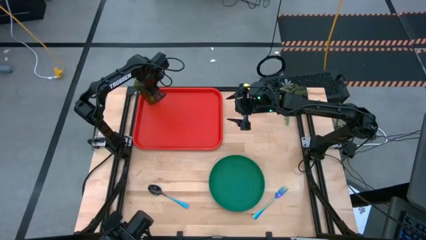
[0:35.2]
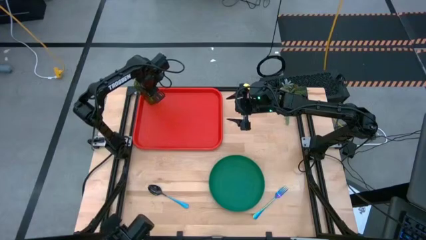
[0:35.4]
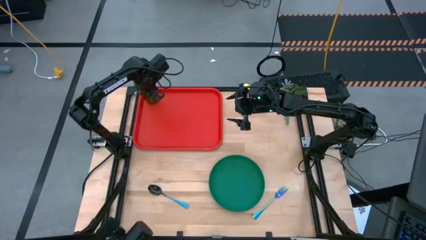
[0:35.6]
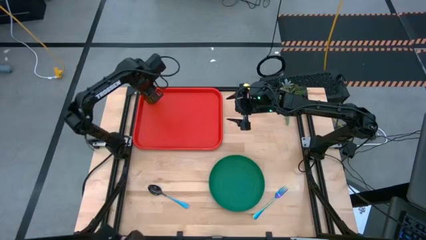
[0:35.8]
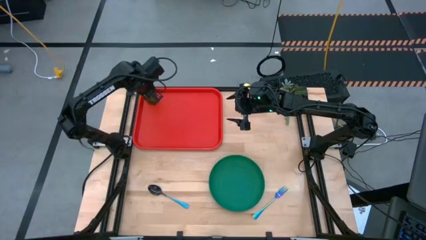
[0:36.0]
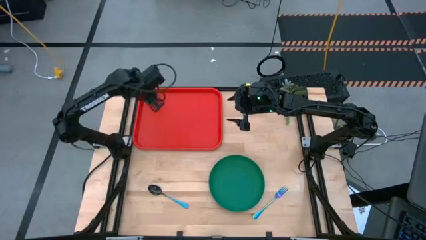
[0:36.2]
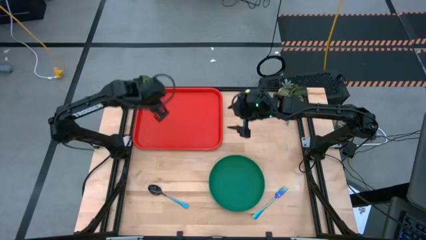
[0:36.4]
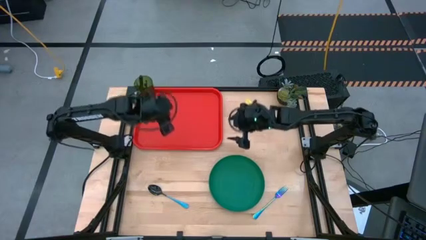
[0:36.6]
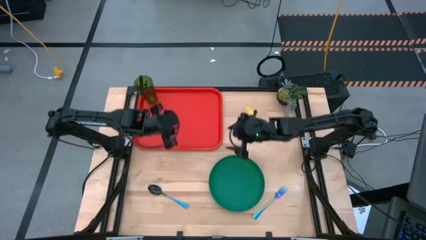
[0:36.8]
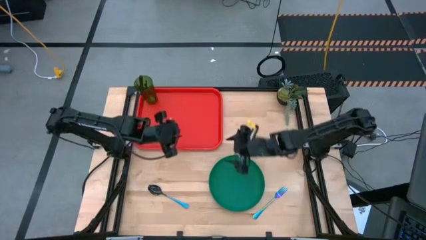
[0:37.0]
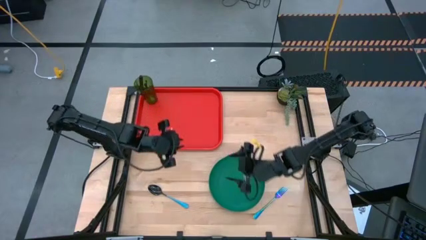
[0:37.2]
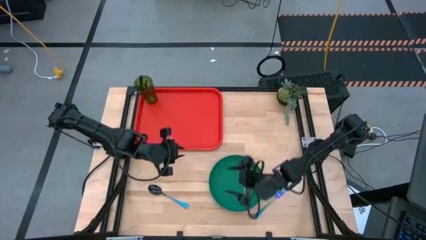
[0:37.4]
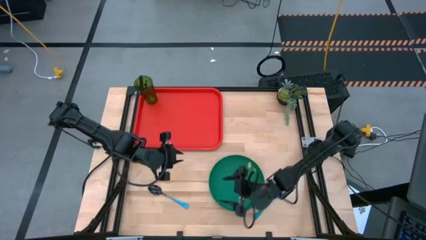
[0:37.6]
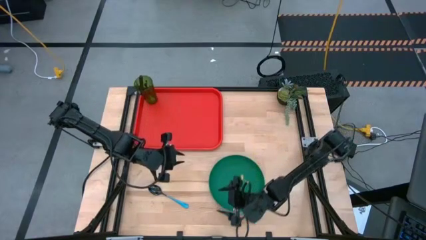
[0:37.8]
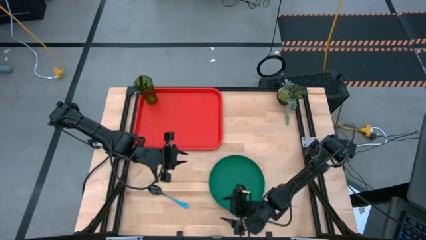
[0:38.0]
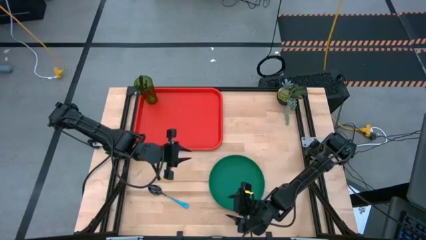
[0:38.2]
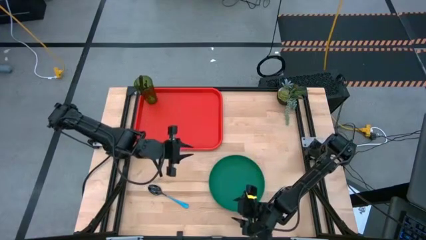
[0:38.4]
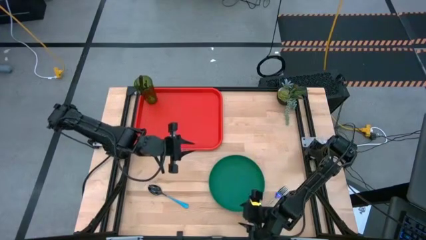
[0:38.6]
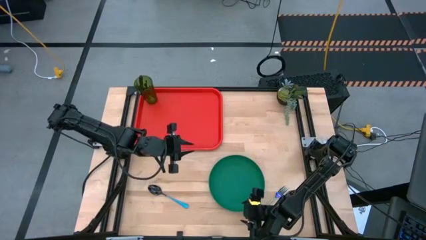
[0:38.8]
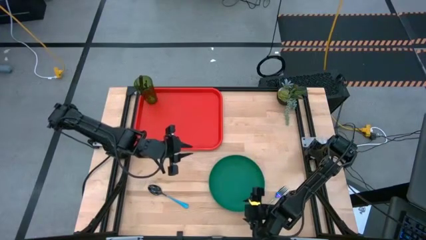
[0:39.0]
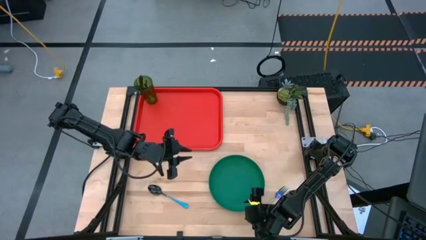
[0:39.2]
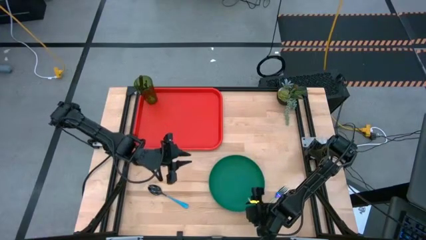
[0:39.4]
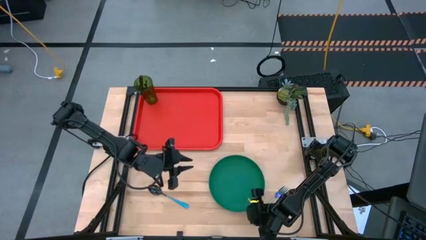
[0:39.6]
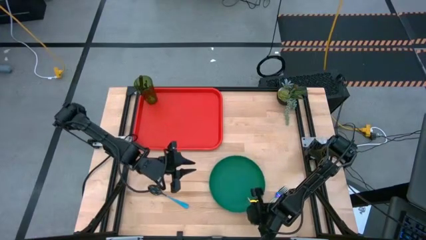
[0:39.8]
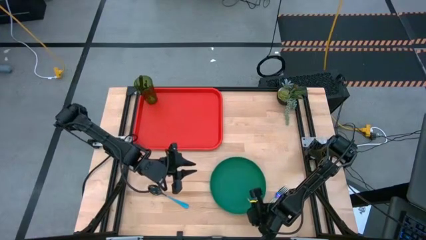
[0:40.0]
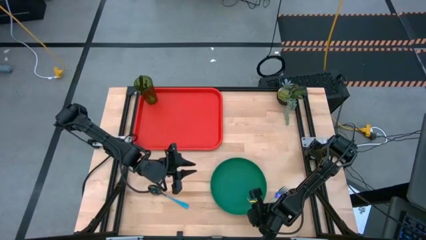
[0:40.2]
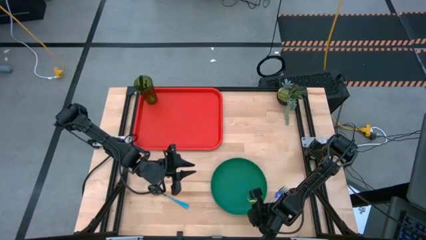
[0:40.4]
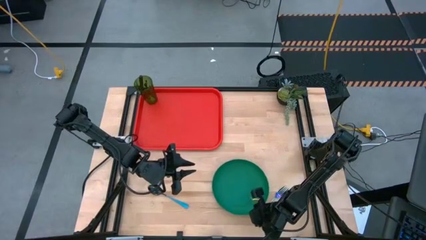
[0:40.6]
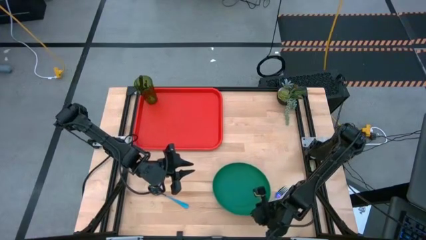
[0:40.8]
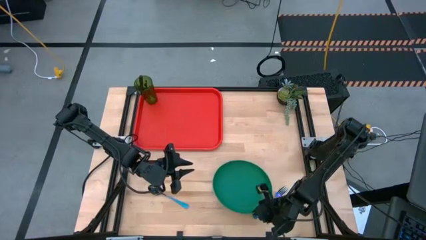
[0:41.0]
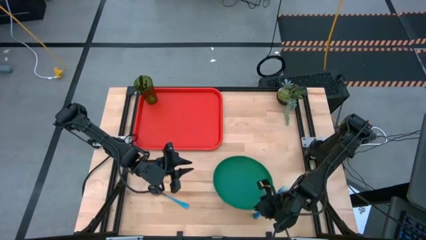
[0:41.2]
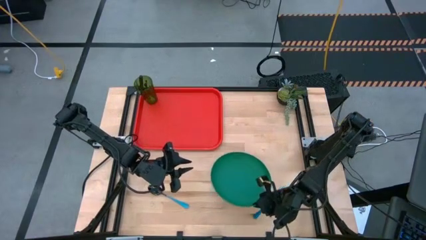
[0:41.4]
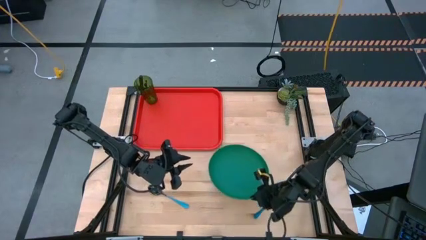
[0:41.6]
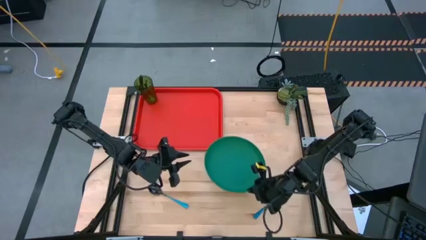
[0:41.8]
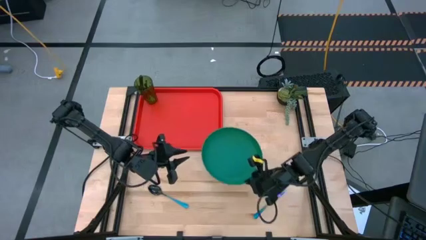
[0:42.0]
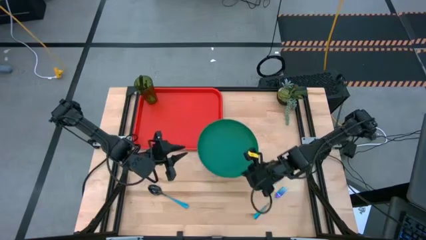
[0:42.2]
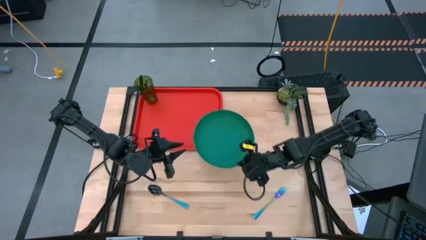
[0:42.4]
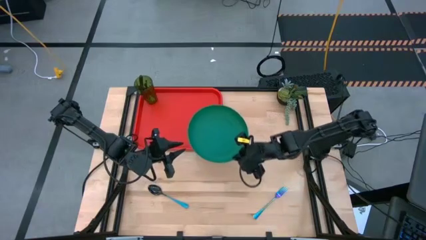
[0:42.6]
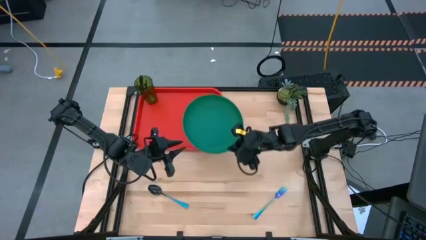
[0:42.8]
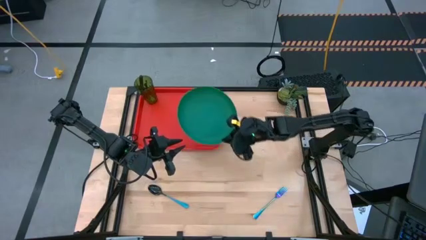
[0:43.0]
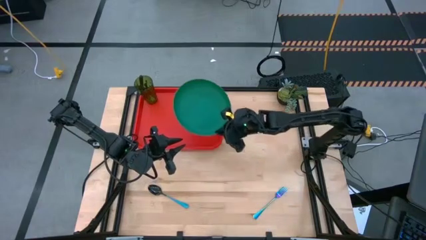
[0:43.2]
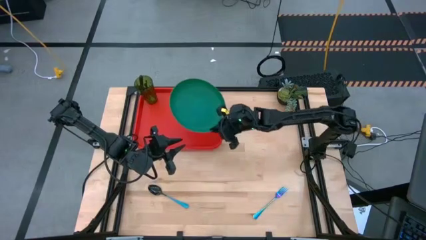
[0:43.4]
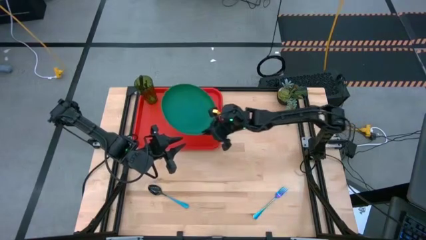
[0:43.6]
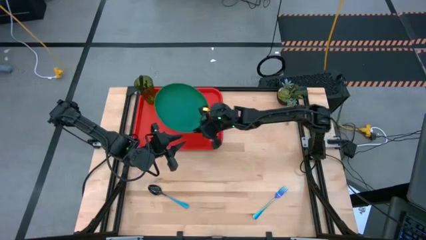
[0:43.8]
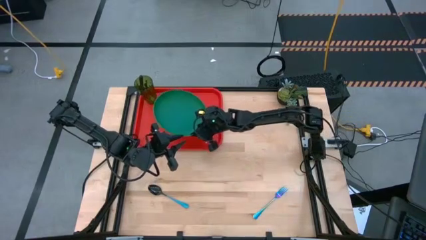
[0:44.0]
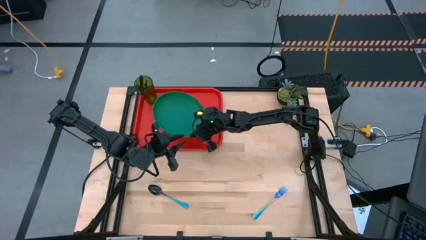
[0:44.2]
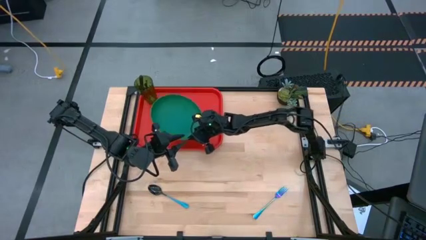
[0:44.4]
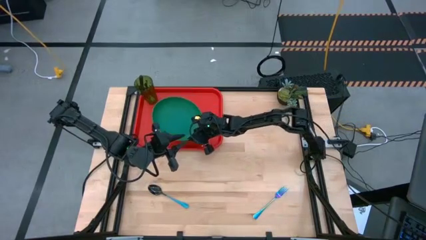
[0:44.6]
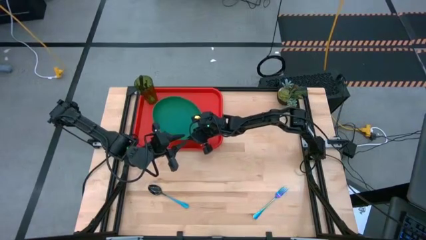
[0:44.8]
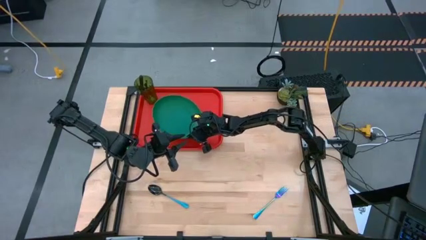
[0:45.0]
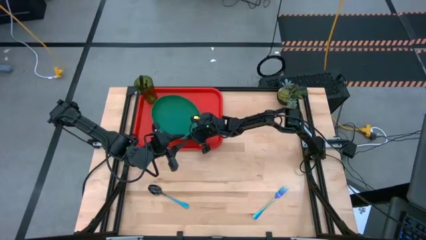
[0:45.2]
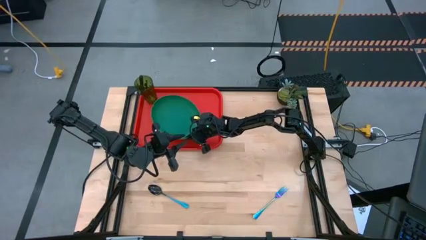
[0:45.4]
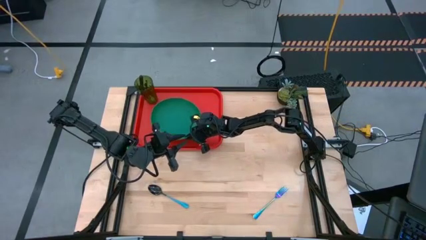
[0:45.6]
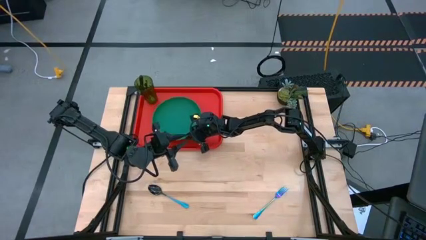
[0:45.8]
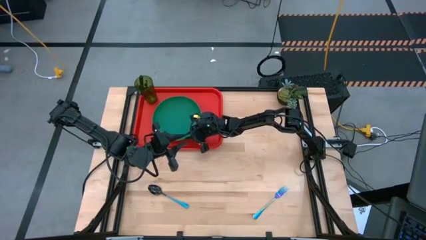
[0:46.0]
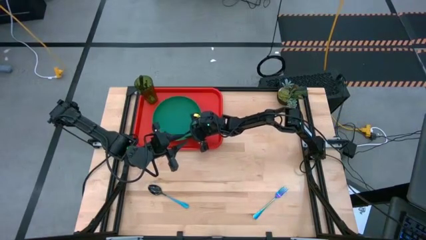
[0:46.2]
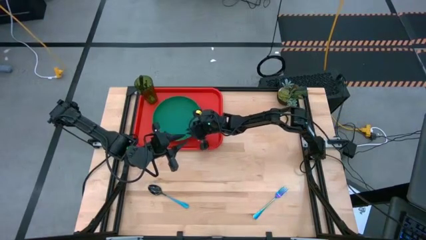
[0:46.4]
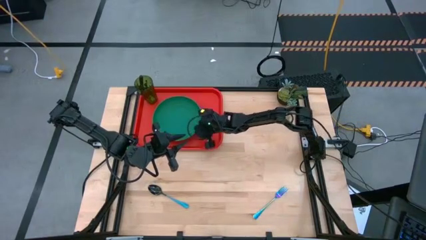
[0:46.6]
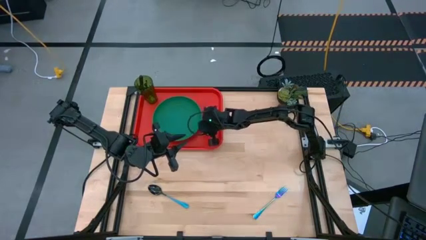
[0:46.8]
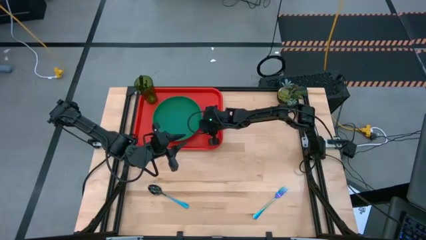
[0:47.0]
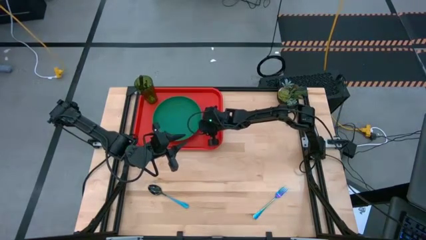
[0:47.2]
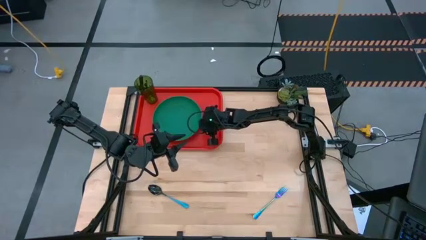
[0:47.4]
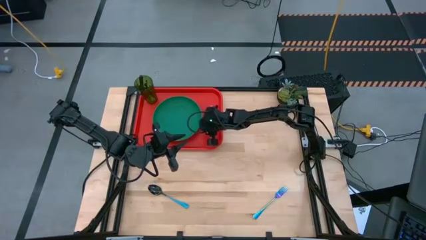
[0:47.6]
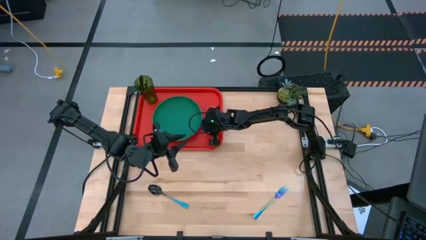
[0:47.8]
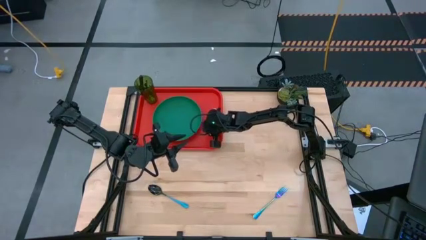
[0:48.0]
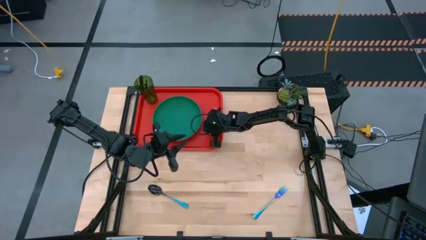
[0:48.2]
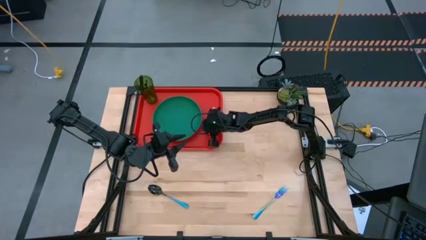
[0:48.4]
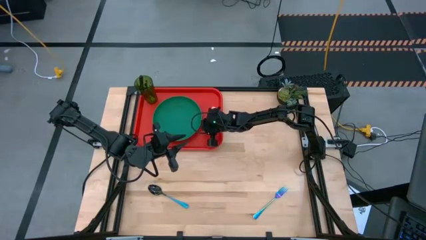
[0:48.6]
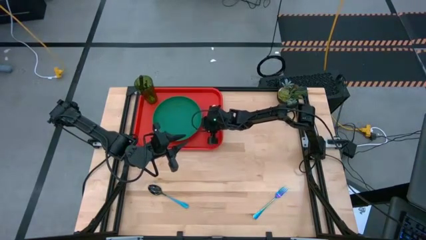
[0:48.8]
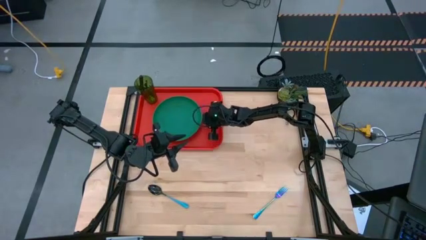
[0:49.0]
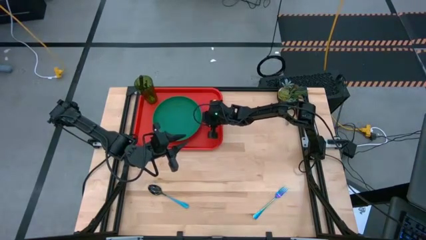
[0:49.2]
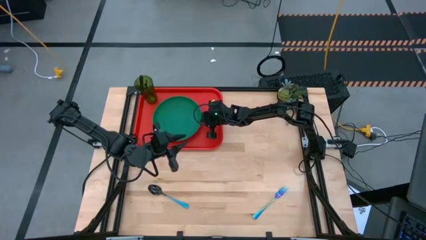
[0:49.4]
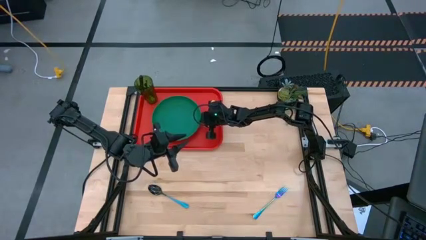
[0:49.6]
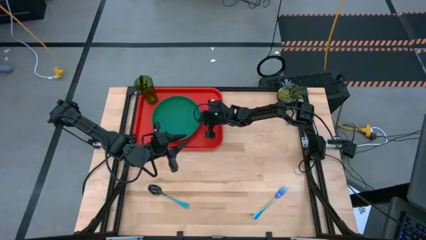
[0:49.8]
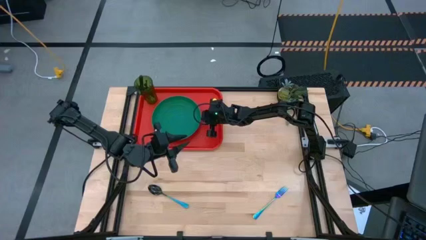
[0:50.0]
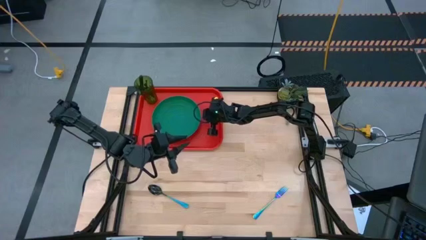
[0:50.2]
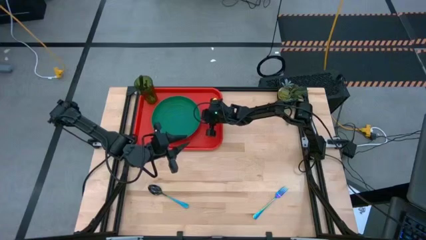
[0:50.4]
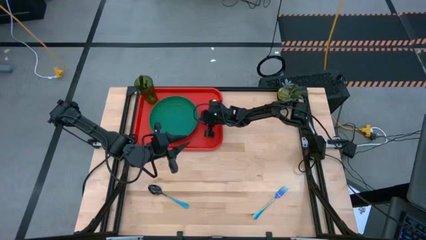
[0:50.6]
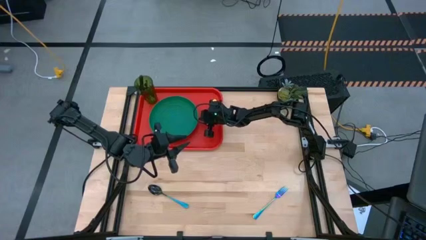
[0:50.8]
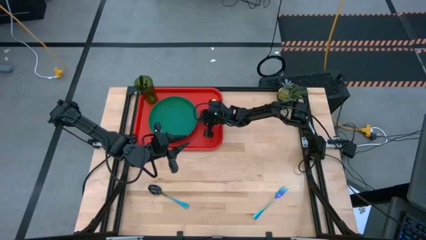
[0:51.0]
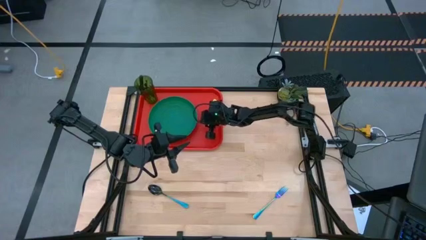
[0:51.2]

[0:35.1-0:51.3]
Task: Pick and place plate/cup/fork/spoon on tray
Put the green plate on the orange tray to the bottom left of the green cup
